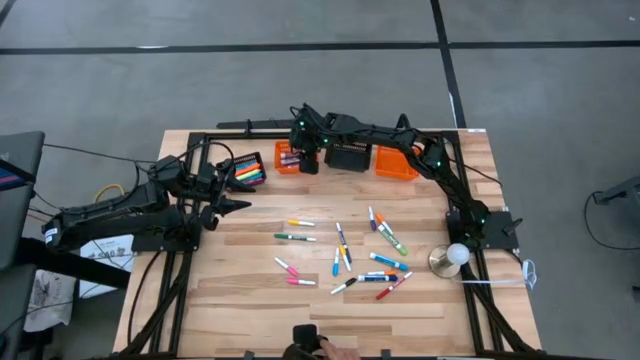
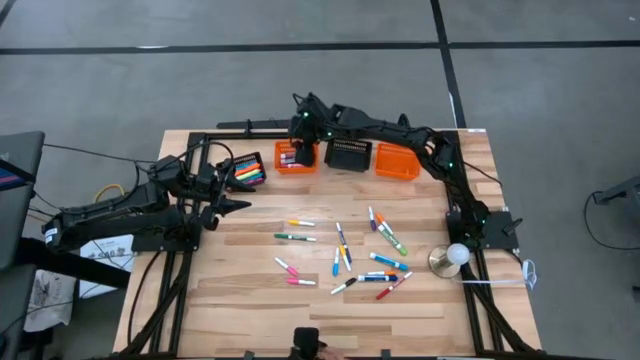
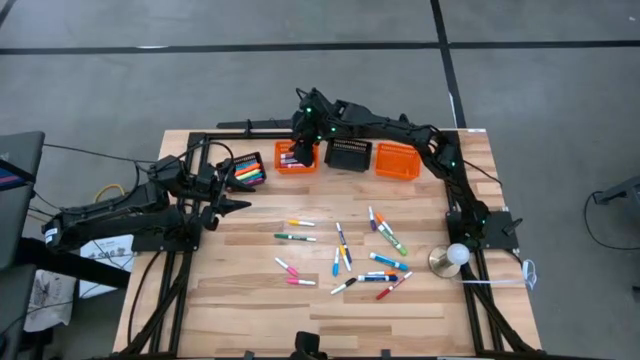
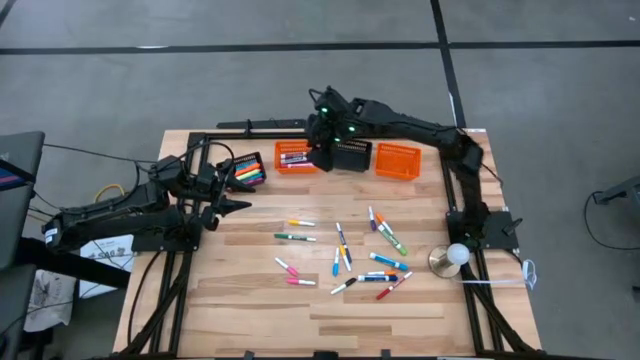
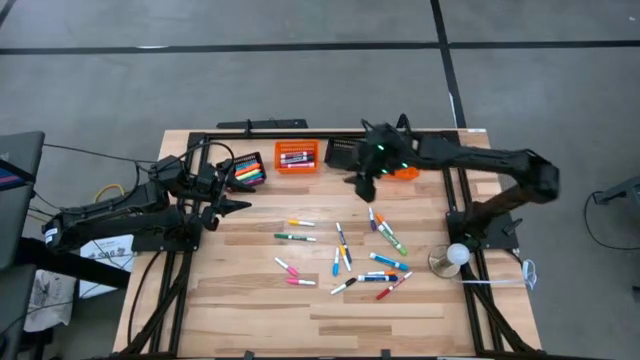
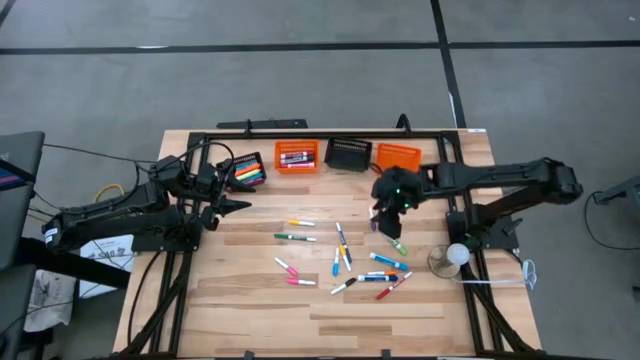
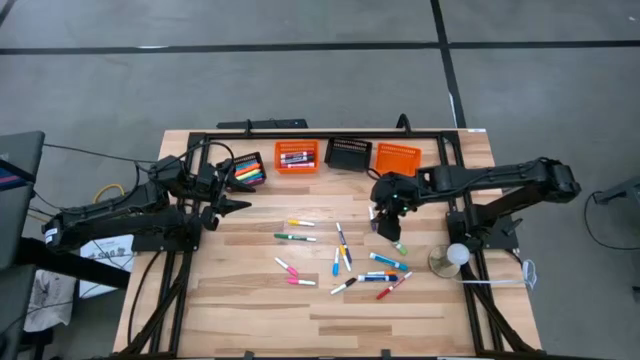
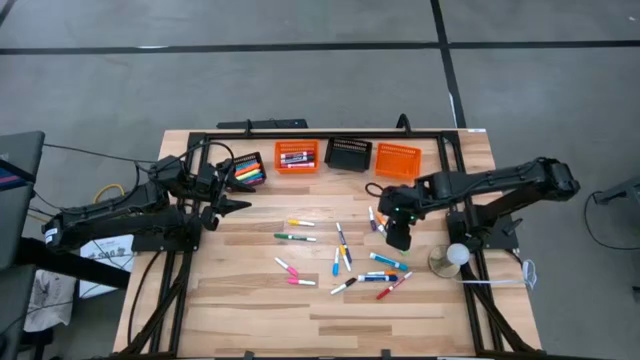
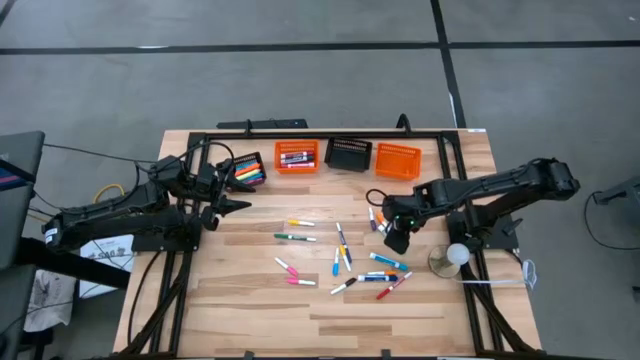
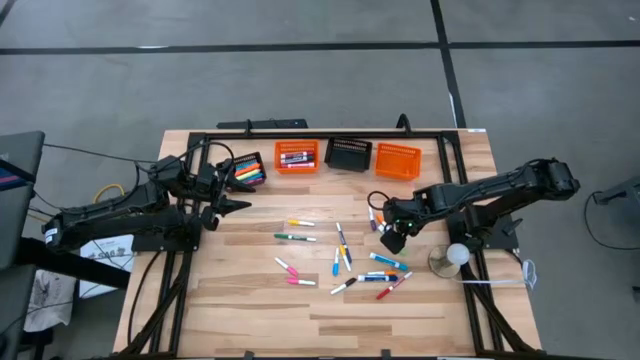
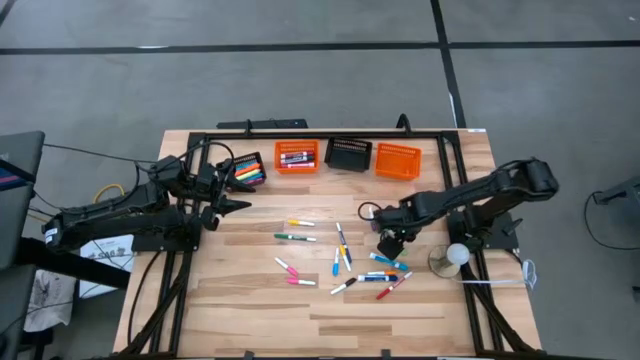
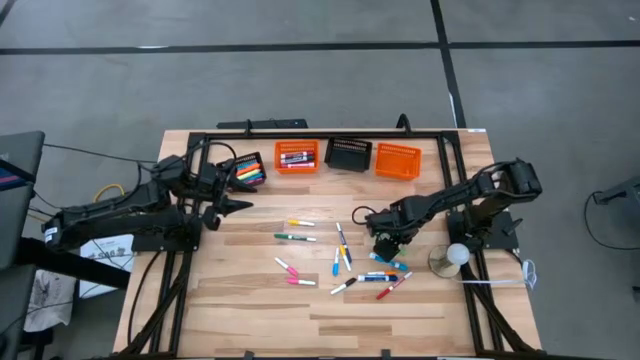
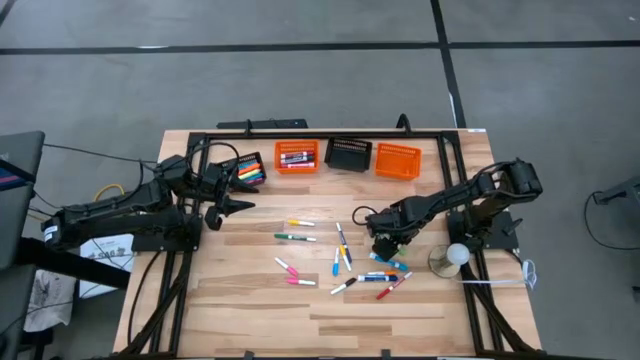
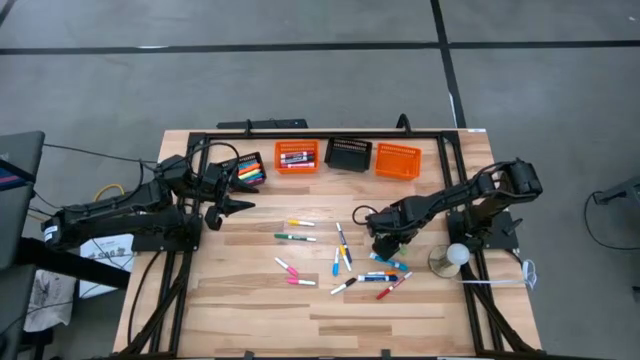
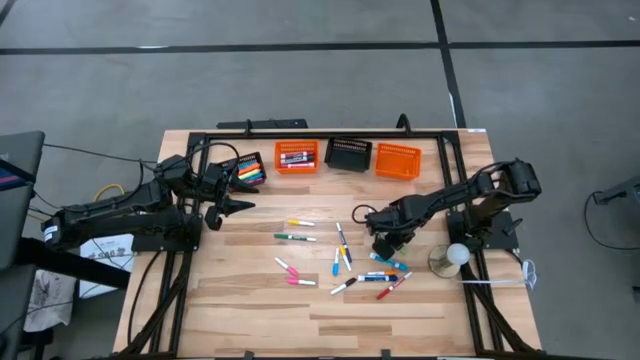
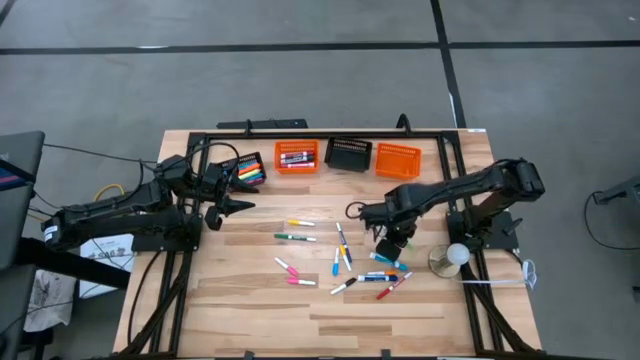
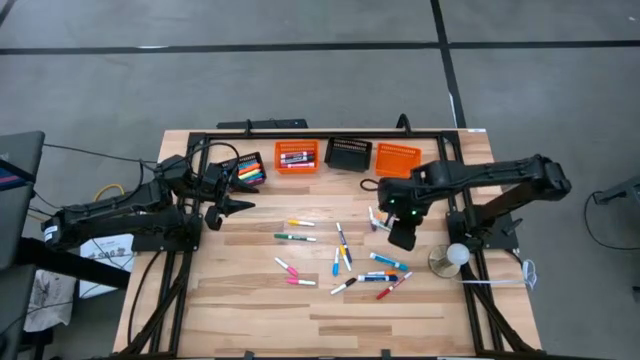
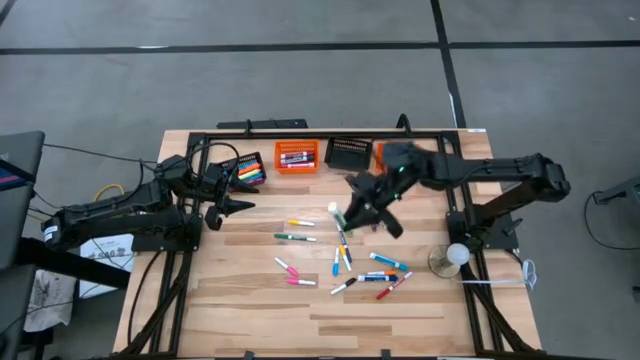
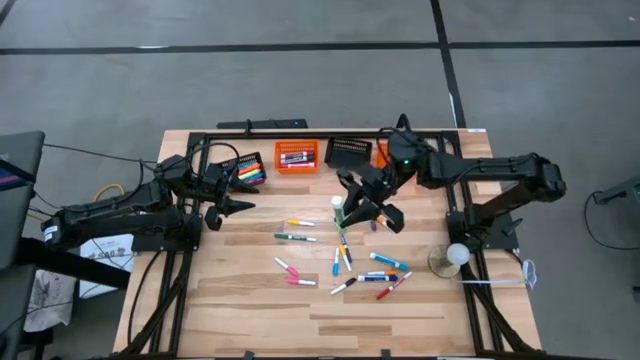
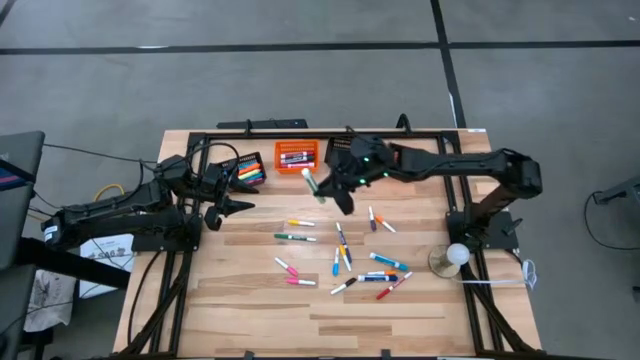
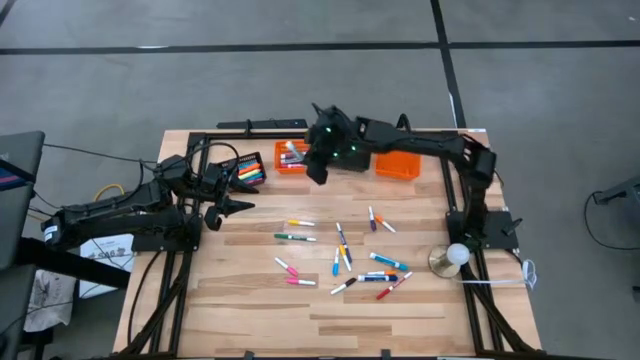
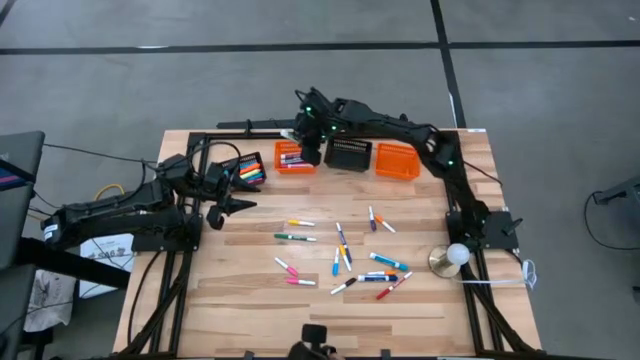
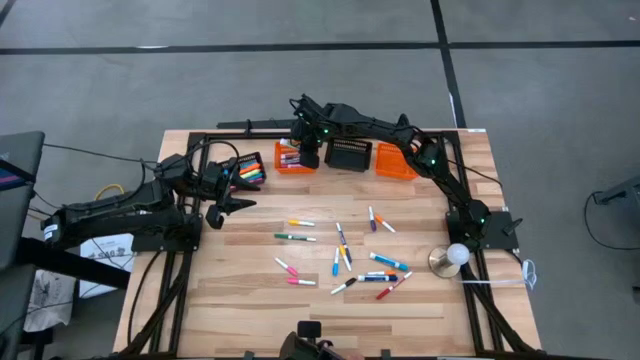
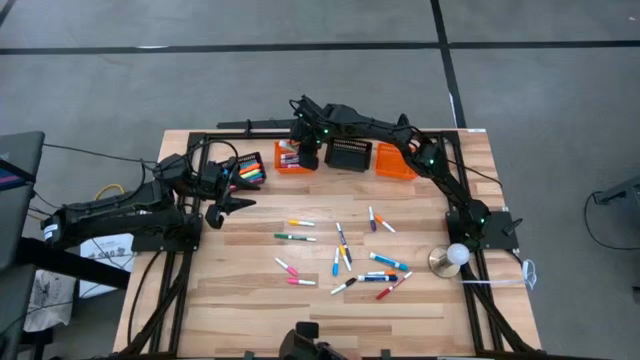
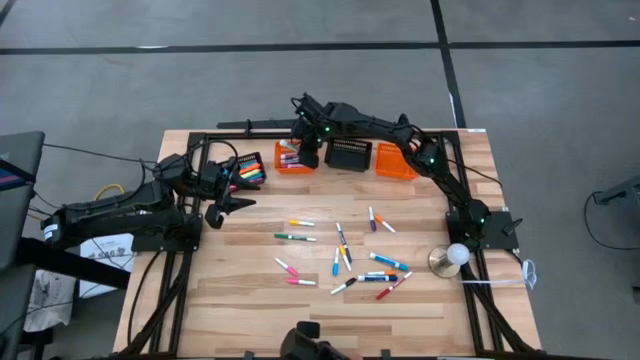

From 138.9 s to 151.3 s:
Task: Pick & Place Markers
Put the large light green marker pen into the left orange bin

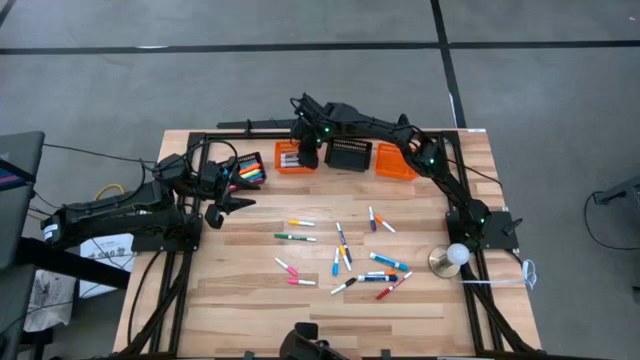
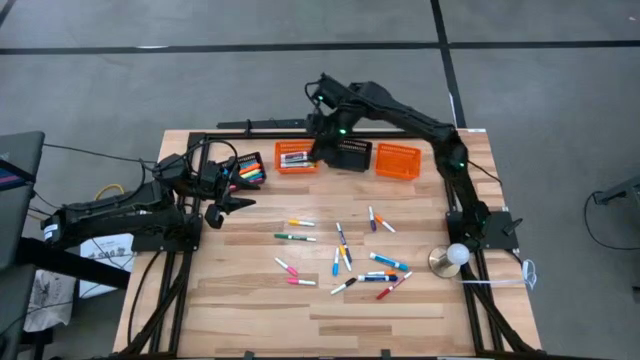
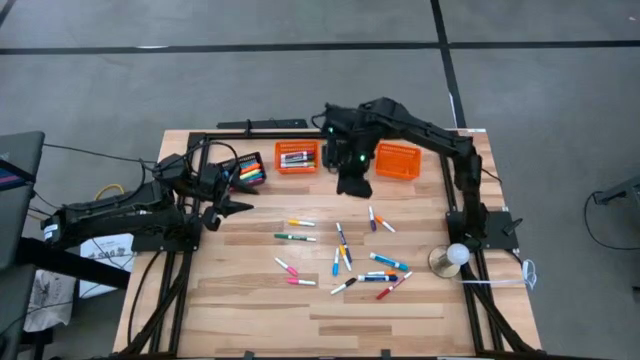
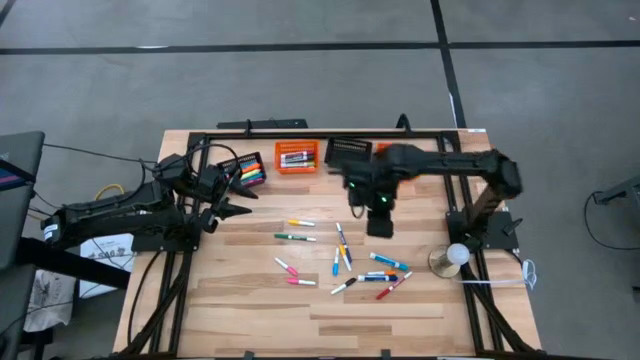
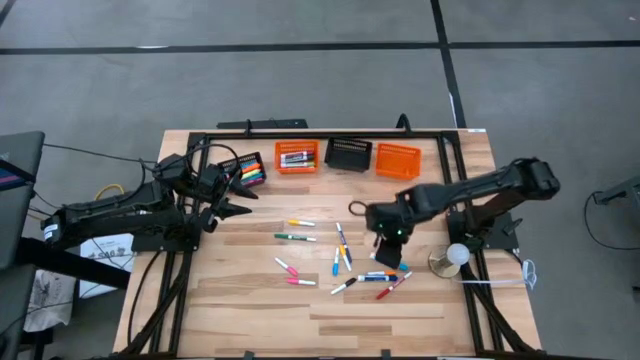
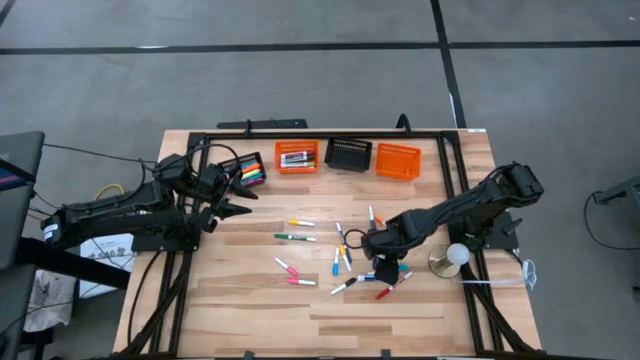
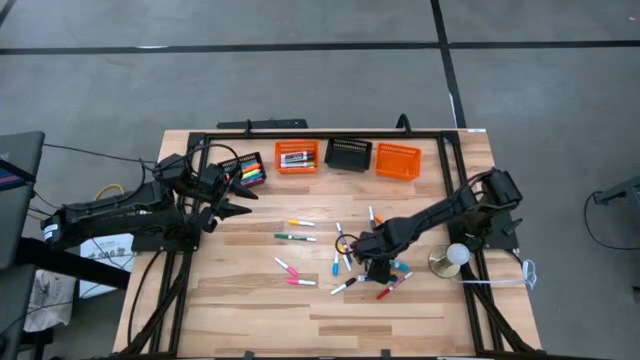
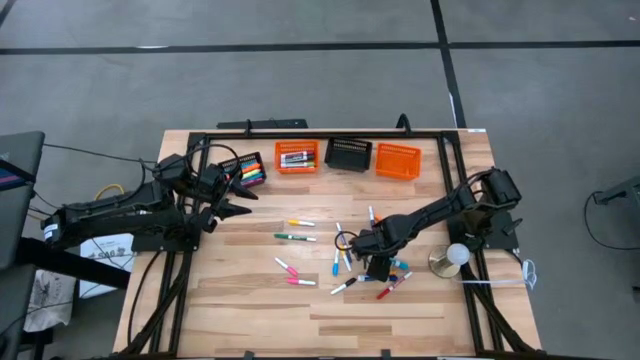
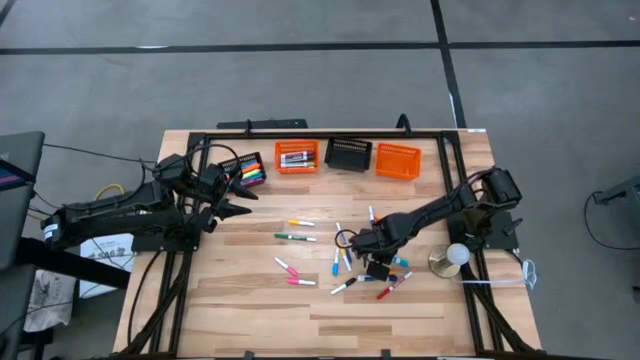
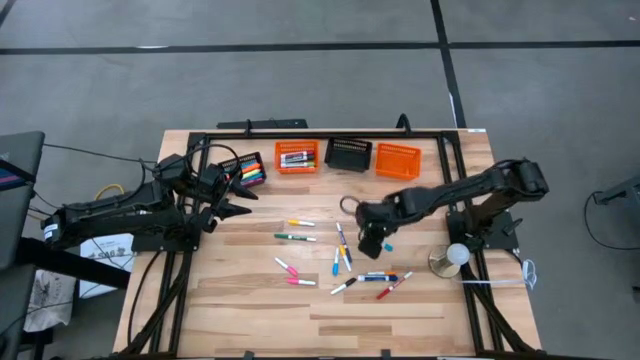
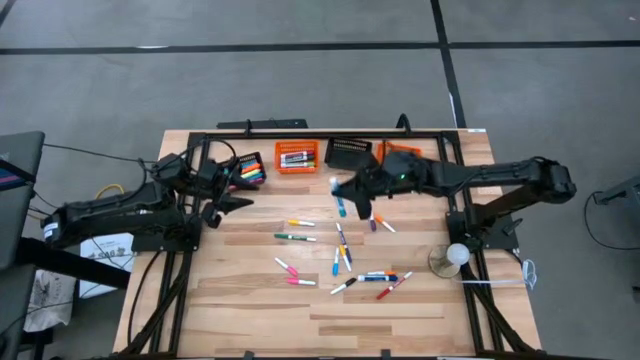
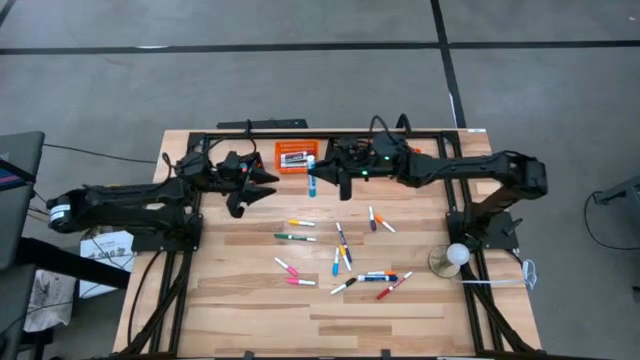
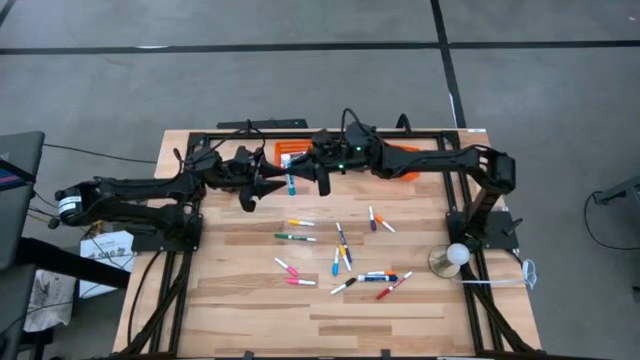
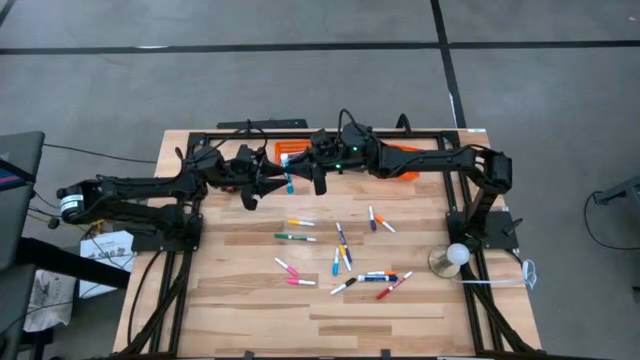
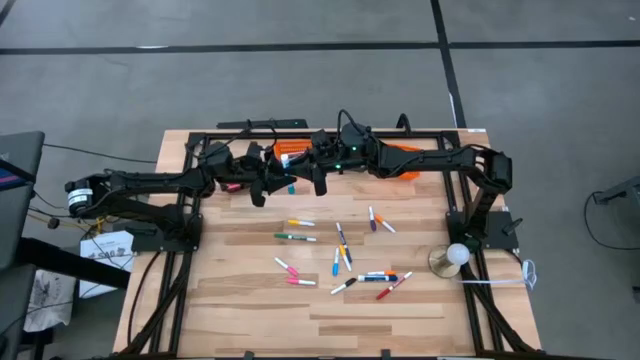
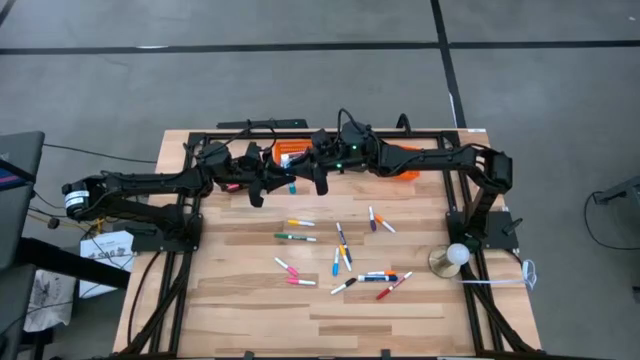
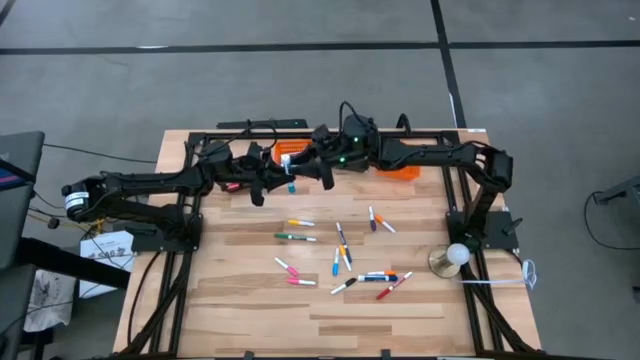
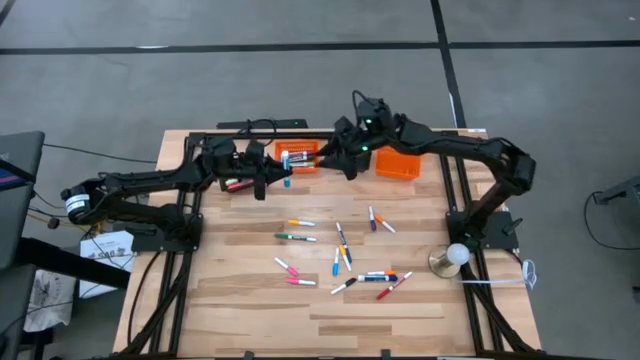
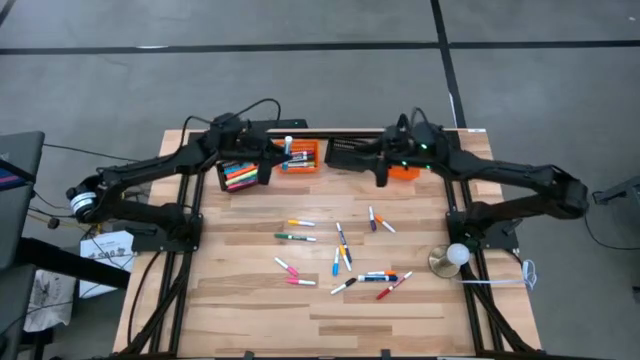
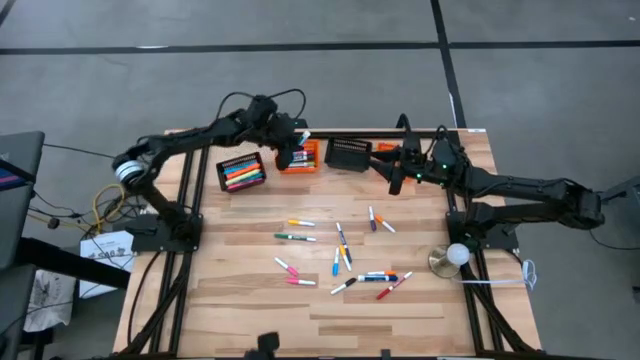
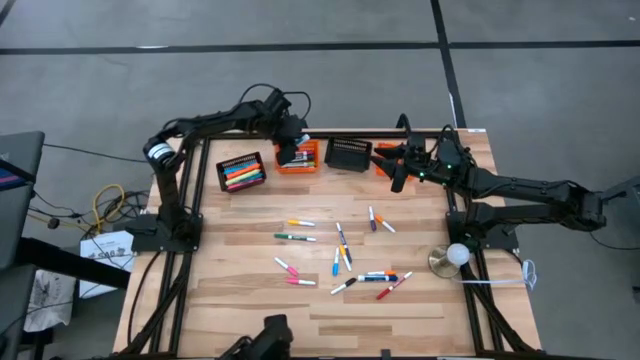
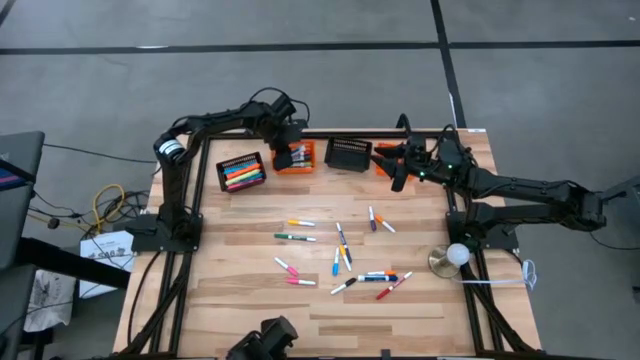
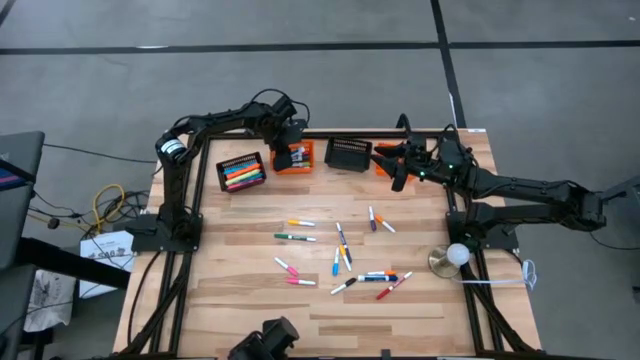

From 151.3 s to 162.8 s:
Put the large light blue marker pen into the left orange bin
